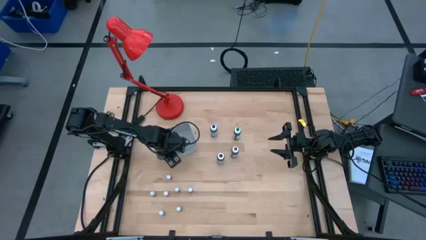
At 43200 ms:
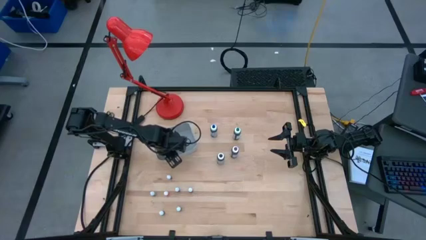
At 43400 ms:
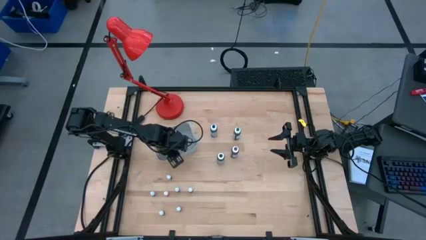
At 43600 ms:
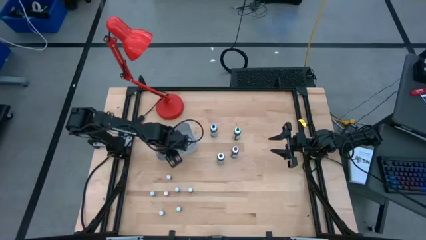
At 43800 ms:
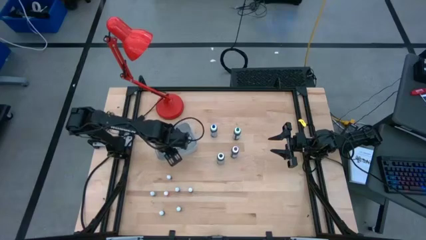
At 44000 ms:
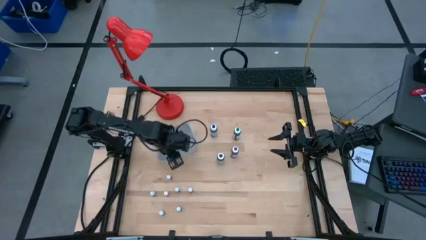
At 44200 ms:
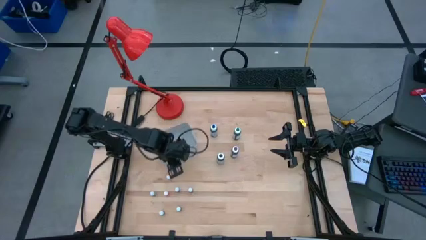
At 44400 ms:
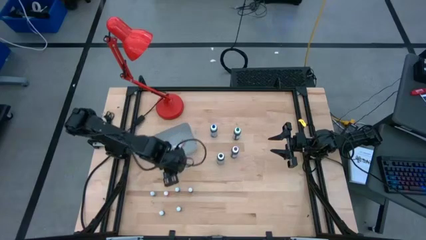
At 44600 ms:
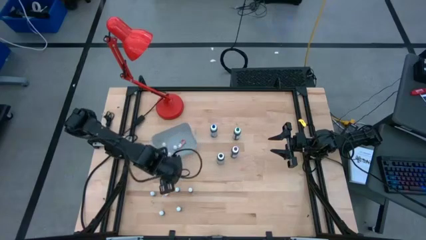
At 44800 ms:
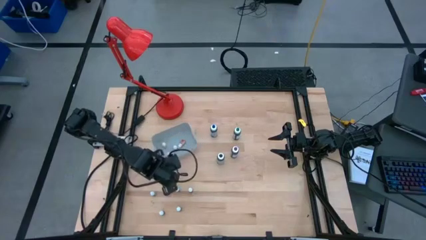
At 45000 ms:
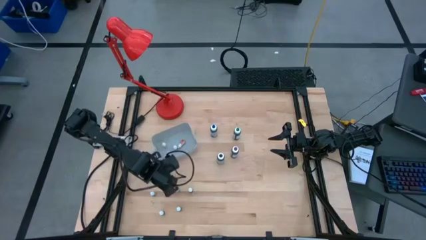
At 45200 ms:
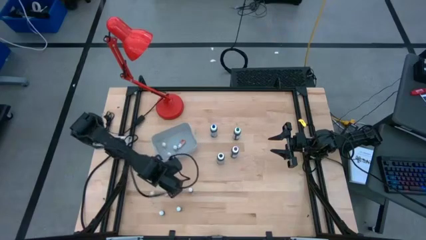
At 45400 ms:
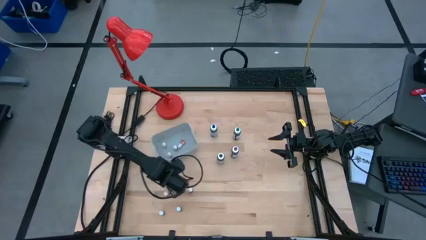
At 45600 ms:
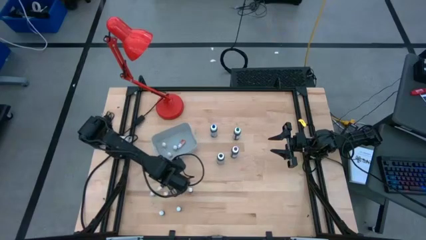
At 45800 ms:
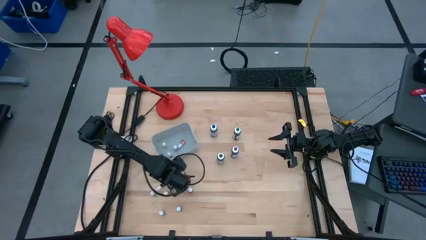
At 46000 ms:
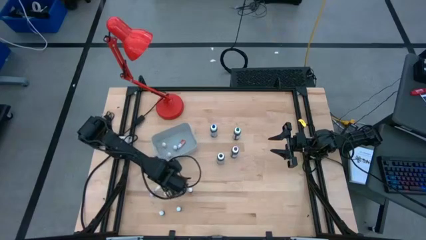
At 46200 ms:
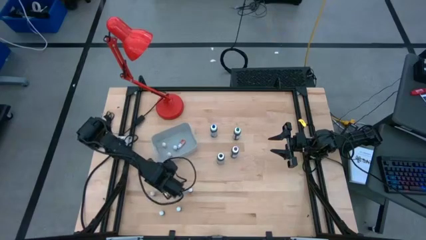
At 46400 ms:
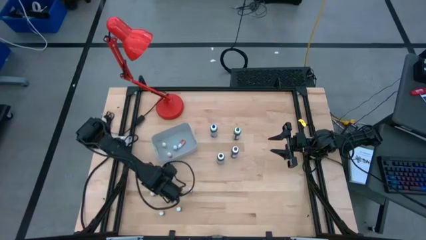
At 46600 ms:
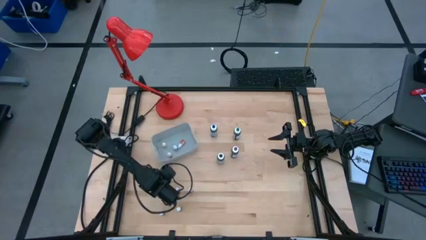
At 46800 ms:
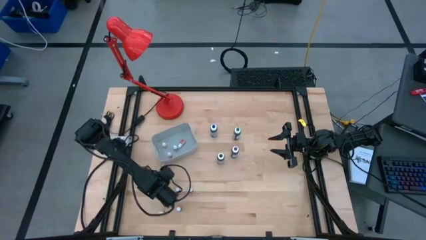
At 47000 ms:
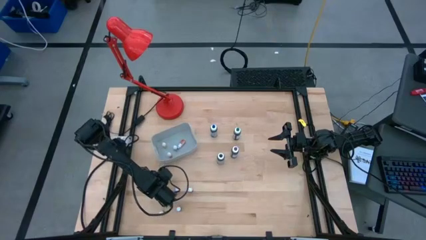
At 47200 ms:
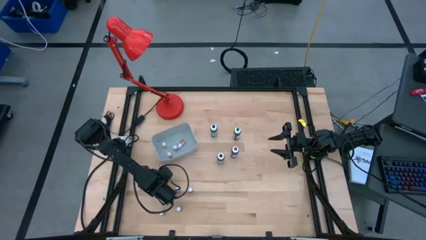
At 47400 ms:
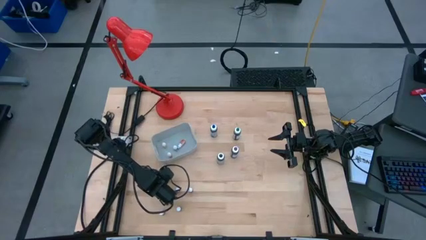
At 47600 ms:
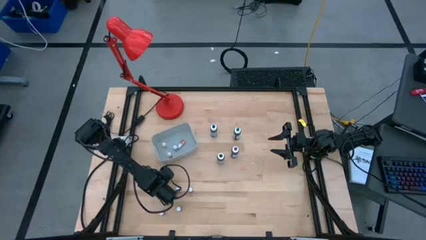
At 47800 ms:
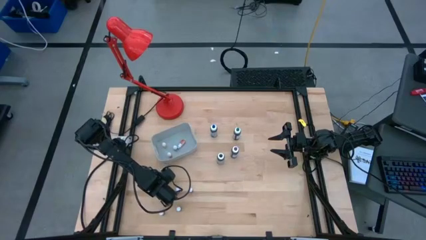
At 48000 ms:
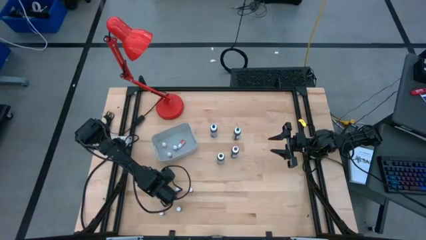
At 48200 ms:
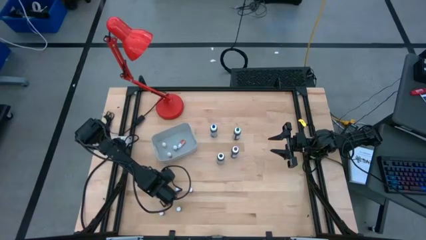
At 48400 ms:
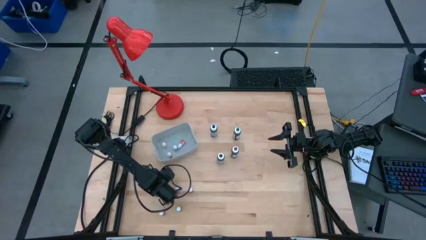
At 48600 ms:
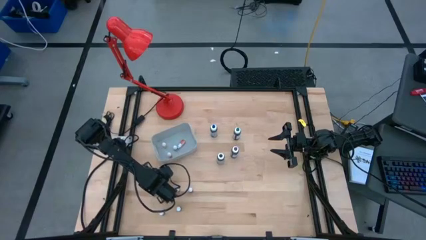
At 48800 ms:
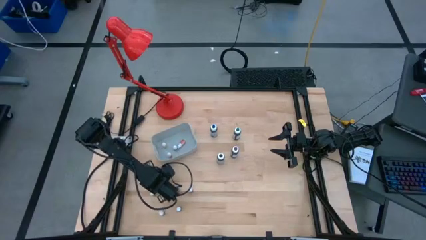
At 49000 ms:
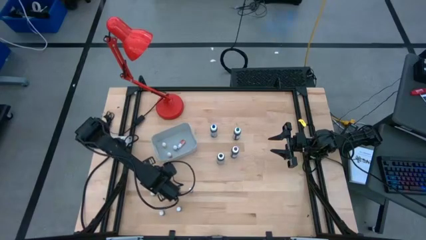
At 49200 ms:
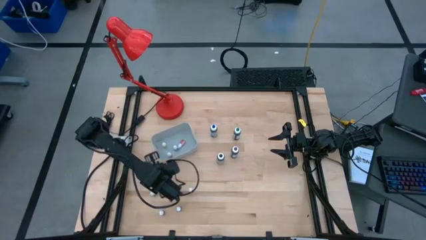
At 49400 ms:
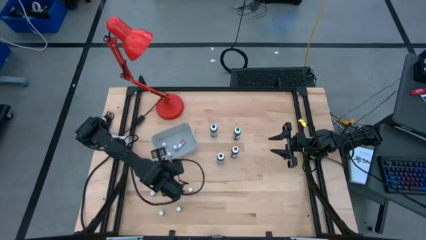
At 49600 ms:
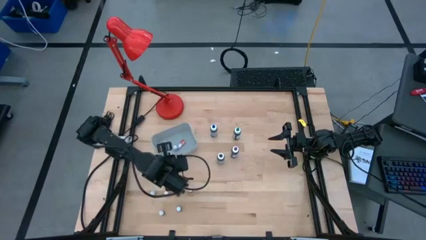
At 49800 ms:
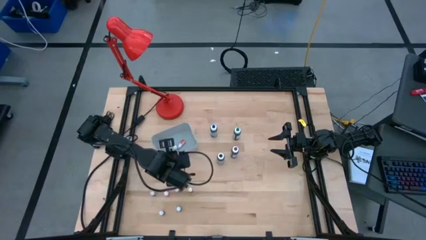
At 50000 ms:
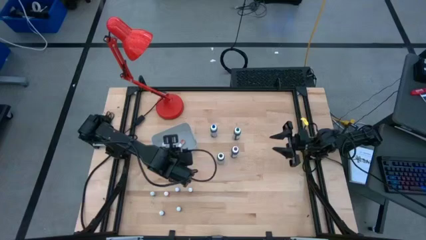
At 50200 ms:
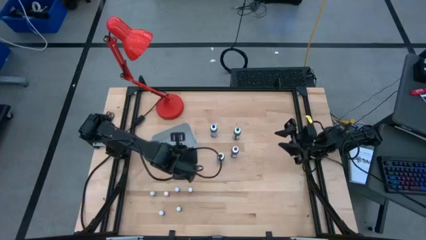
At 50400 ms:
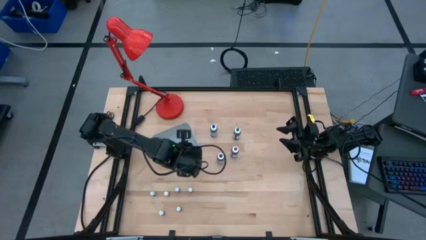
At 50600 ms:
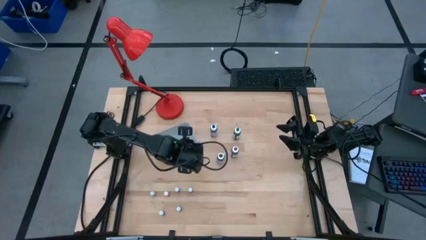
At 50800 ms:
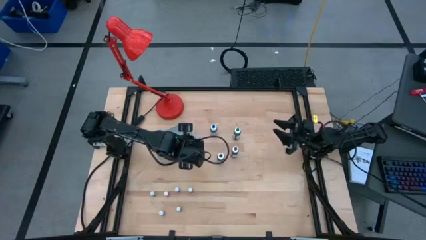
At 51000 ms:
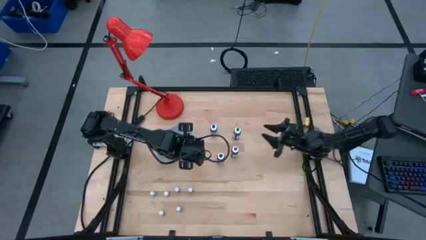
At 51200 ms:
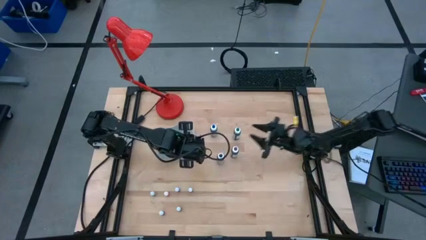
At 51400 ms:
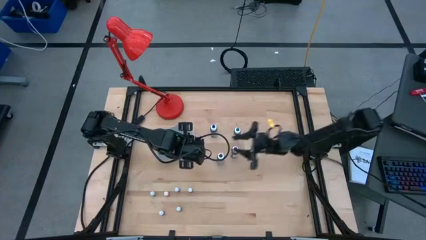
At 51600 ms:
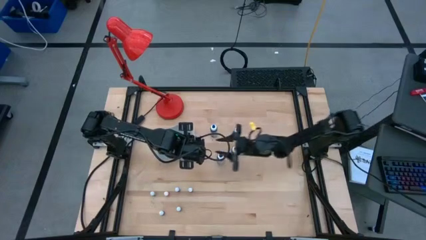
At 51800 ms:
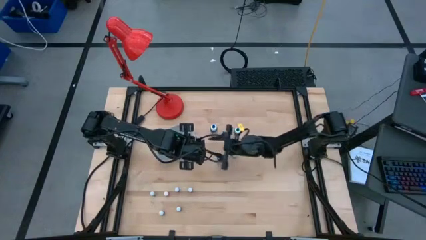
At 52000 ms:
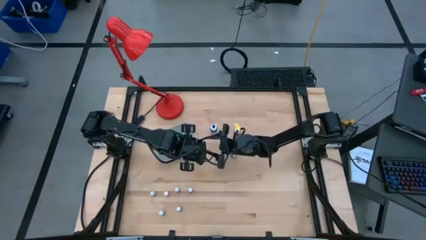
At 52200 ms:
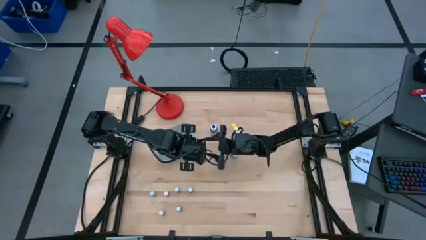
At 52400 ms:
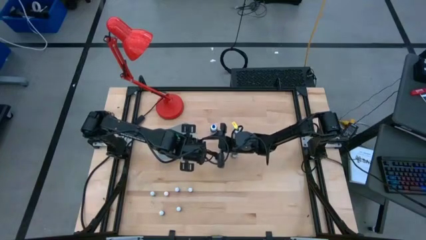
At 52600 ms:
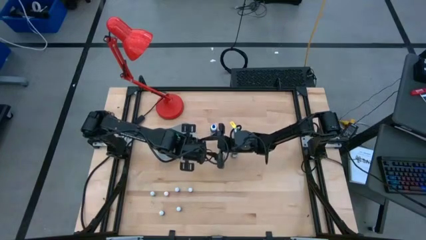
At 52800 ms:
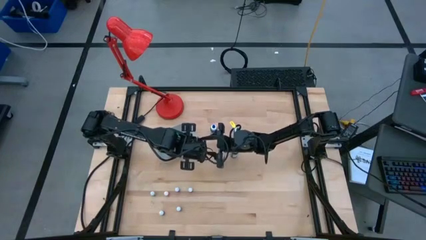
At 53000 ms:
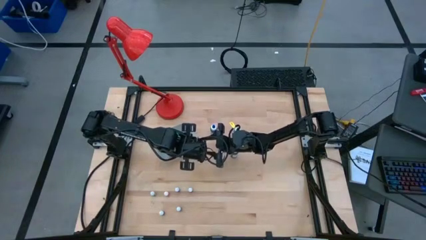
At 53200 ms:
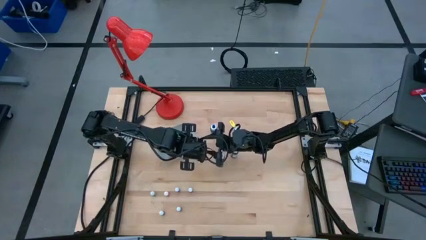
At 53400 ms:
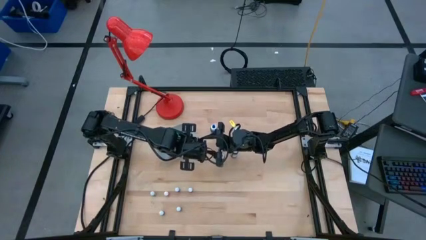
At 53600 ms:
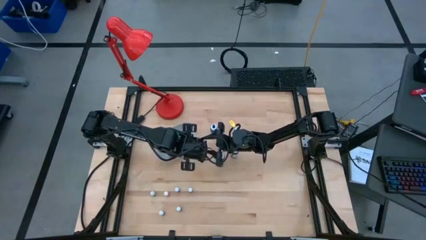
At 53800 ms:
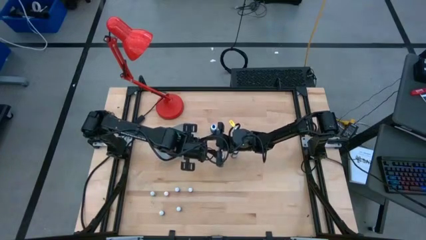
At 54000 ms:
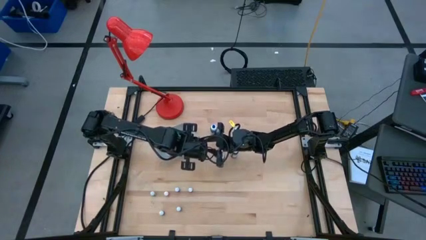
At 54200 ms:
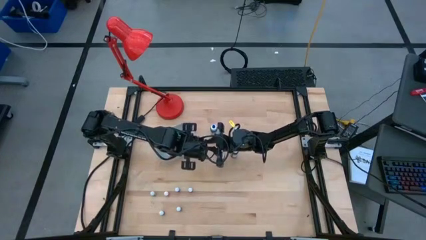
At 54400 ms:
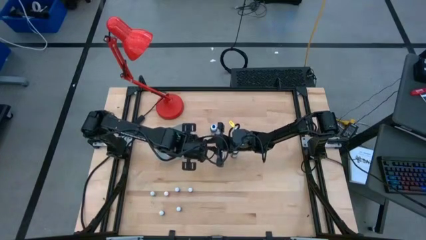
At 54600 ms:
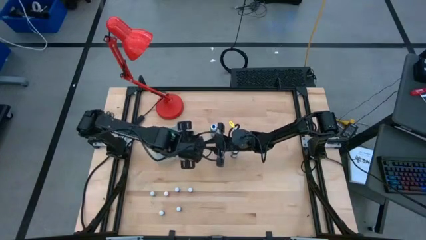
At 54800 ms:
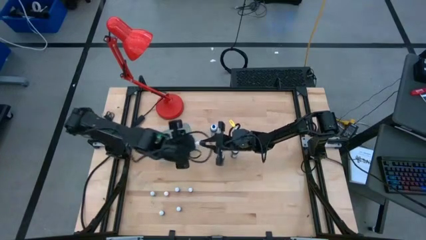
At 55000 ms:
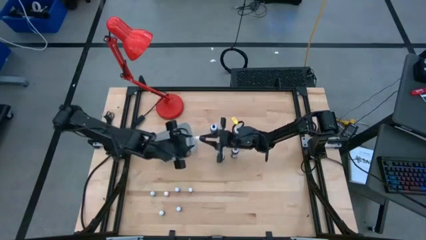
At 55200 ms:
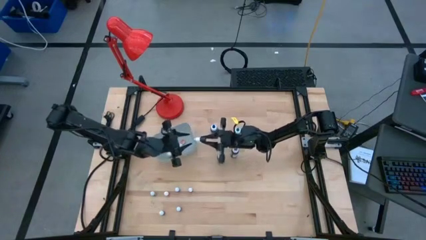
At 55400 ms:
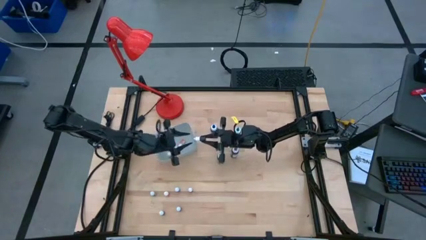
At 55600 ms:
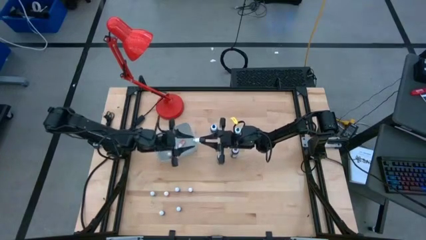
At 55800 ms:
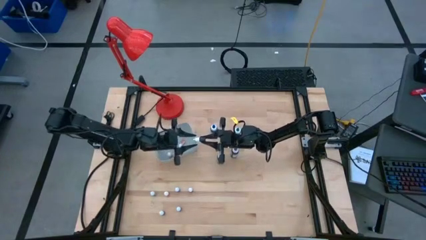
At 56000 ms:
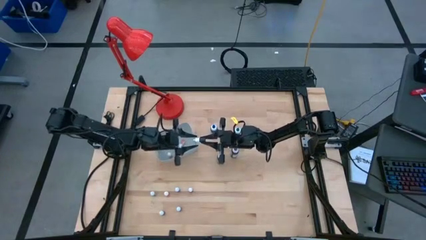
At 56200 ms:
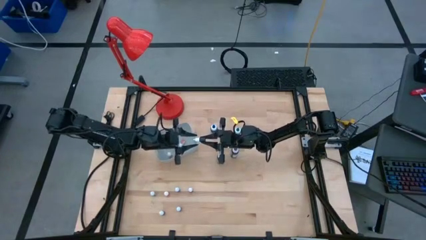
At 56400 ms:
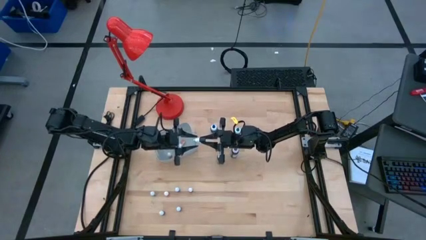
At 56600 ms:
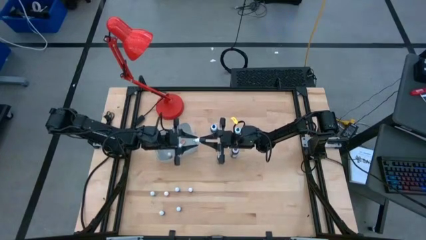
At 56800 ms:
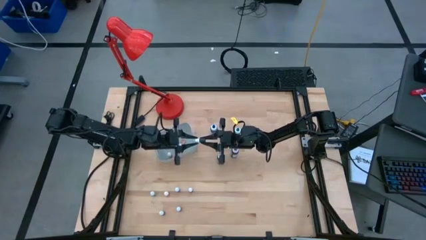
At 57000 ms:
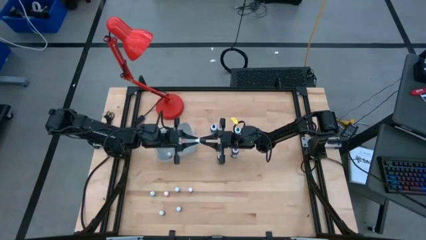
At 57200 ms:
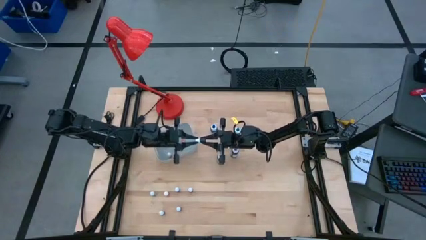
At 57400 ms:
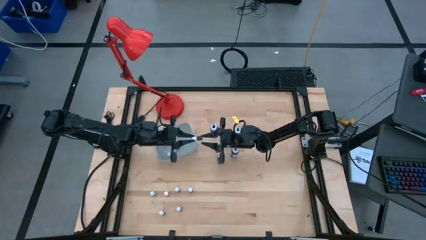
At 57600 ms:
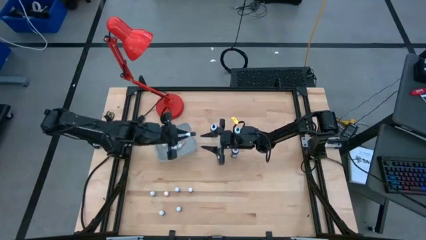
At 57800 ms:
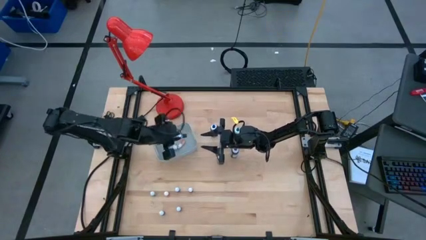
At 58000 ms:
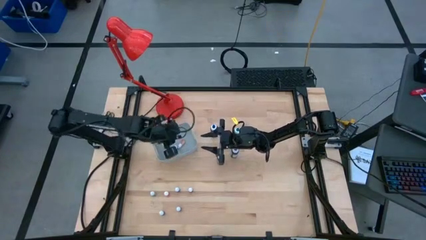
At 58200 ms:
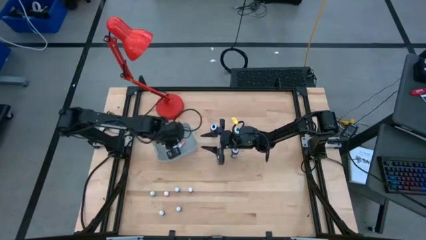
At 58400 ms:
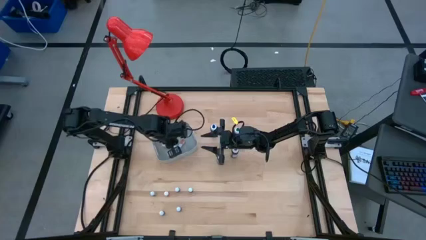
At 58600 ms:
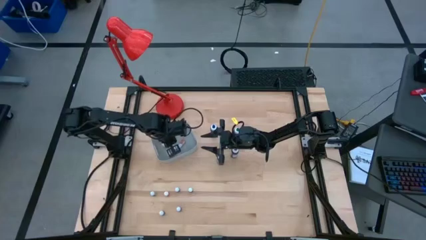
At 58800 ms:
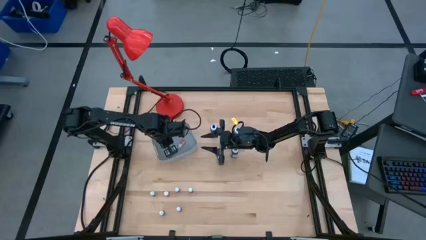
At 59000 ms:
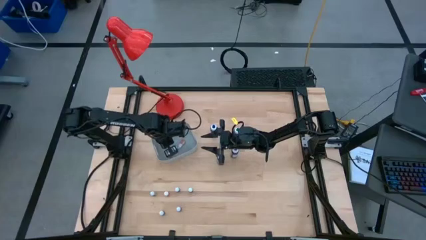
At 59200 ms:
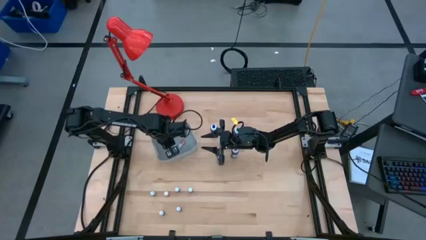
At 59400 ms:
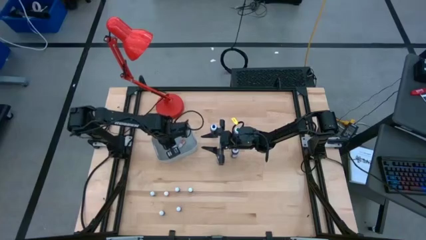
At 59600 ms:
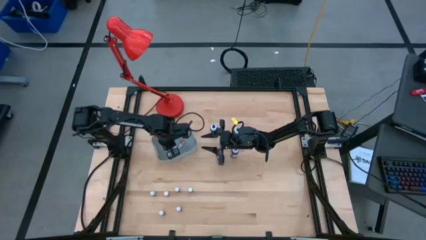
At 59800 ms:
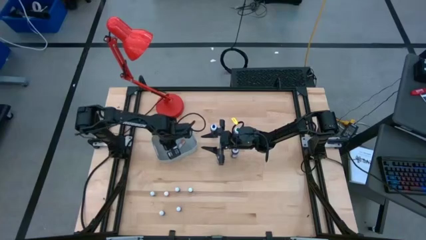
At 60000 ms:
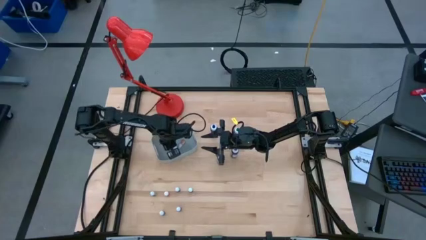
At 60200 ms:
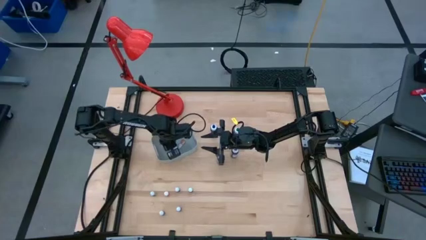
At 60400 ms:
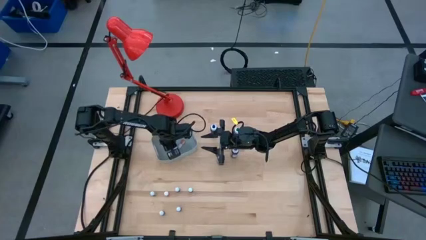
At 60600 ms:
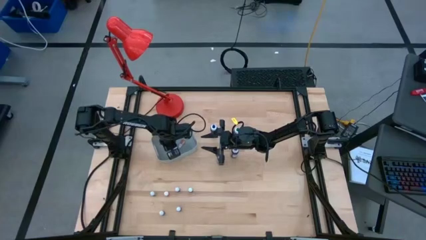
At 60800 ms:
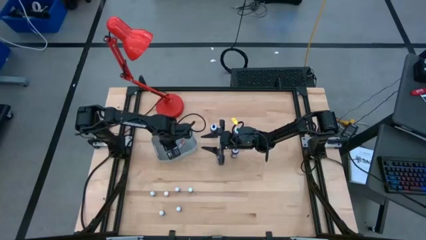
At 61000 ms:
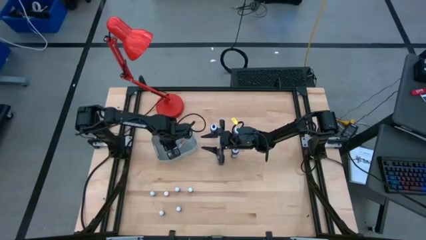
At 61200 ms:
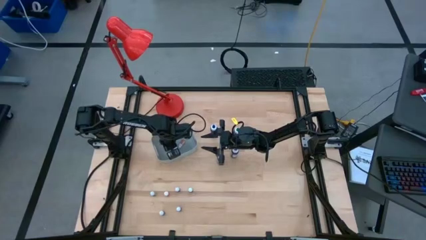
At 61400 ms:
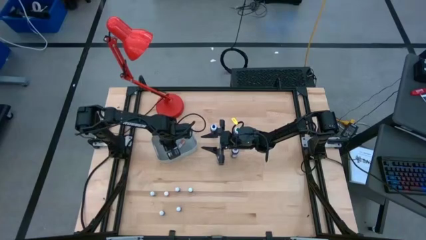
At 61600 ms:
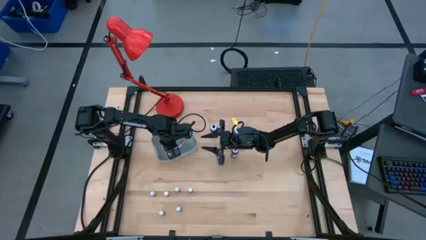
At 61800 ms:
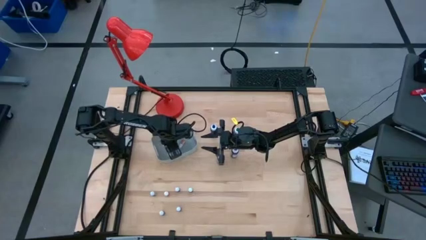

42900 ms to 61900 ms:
Task: Pick & Place food coloring
Put the top small black coloring bottle into the gray container
